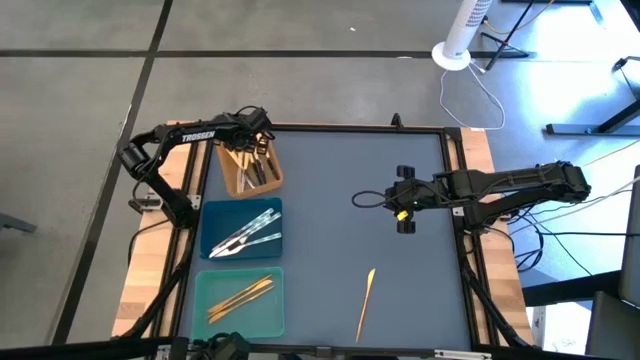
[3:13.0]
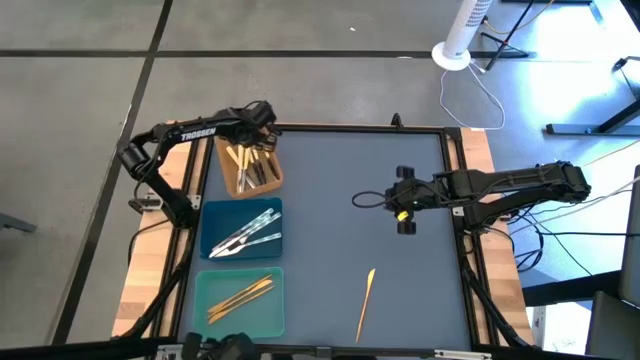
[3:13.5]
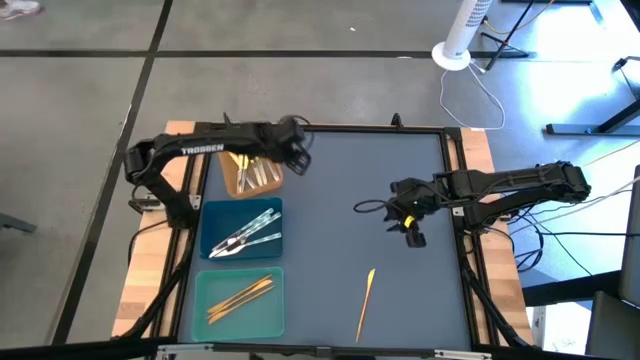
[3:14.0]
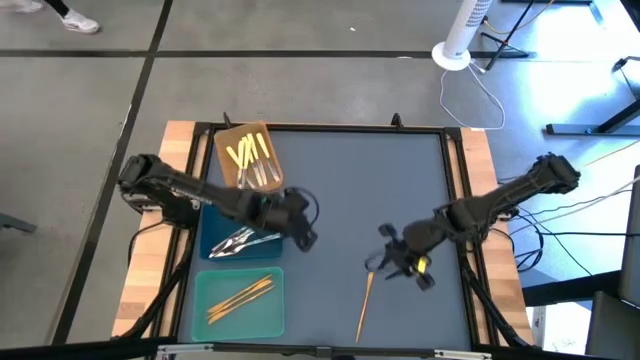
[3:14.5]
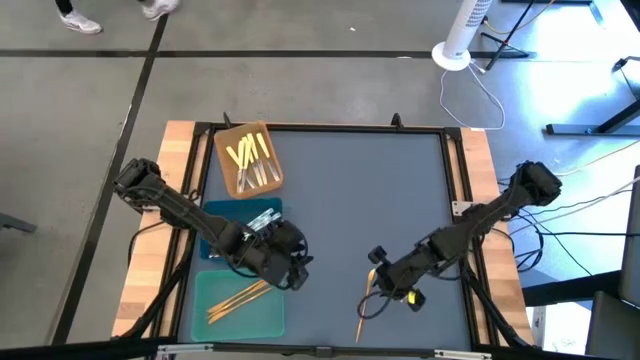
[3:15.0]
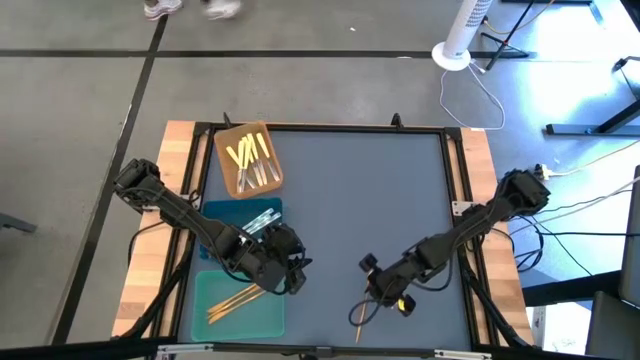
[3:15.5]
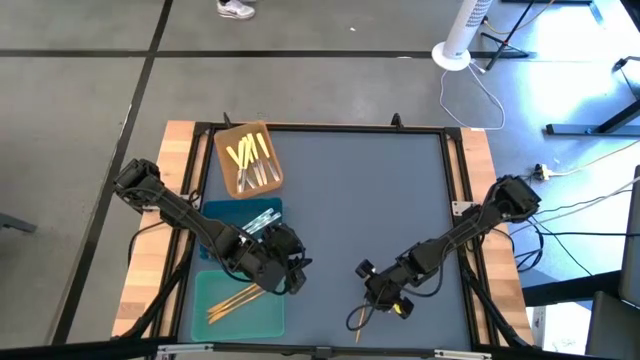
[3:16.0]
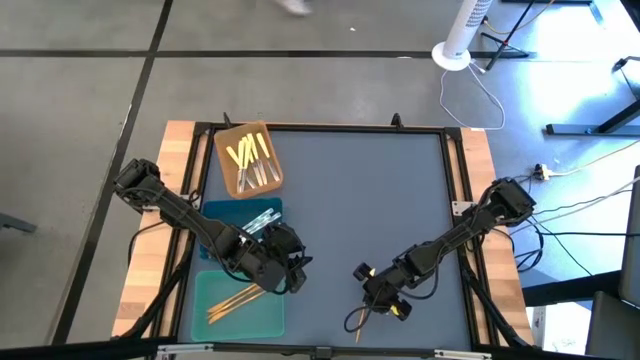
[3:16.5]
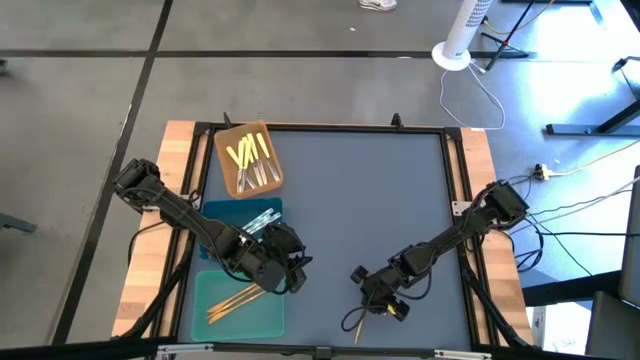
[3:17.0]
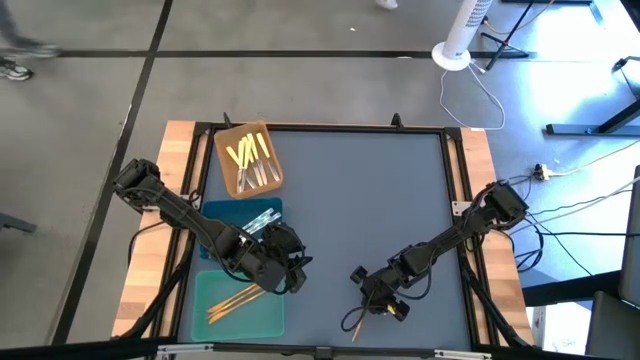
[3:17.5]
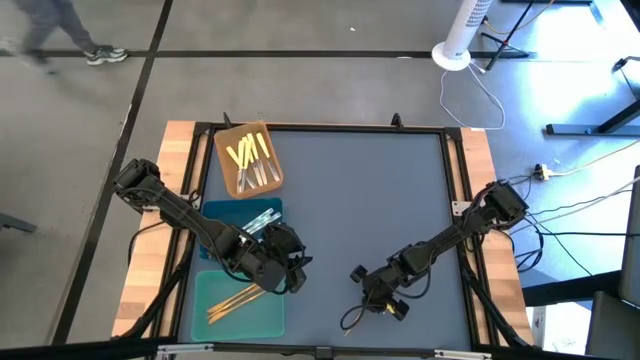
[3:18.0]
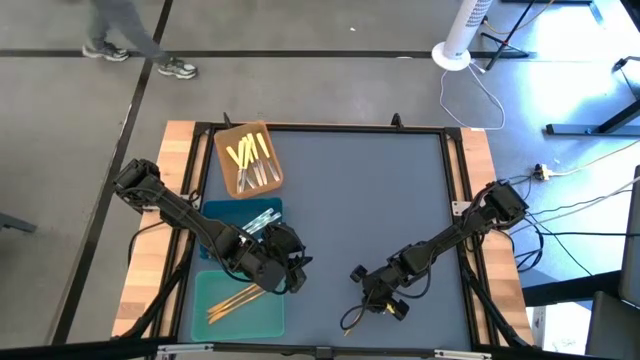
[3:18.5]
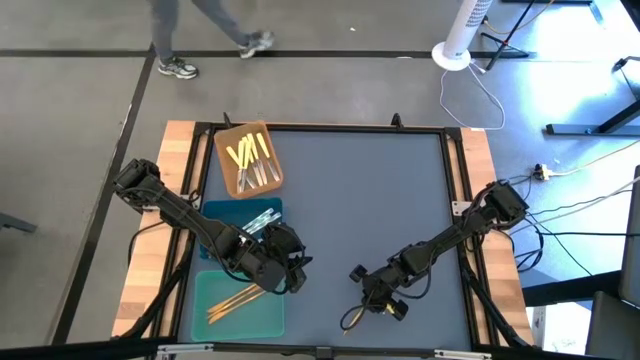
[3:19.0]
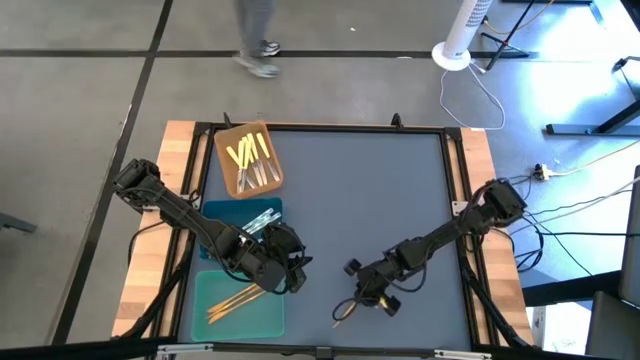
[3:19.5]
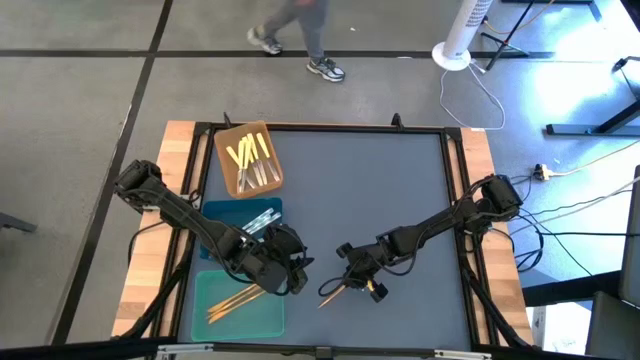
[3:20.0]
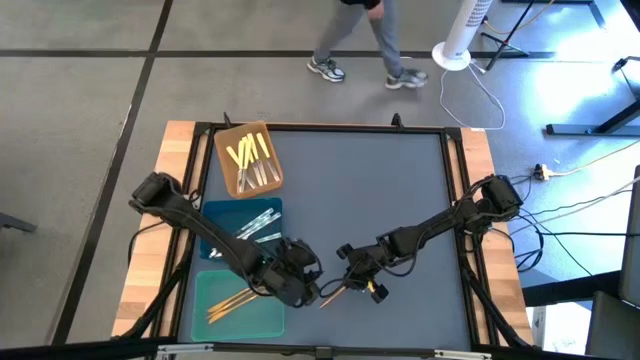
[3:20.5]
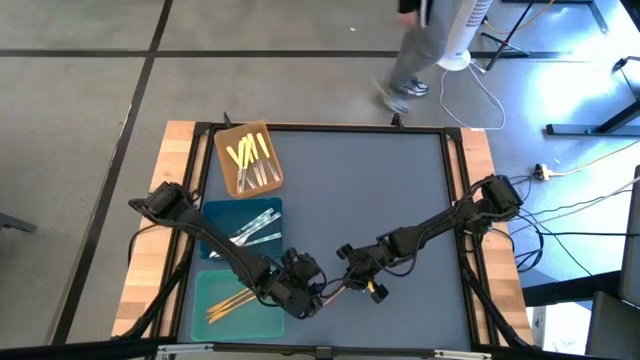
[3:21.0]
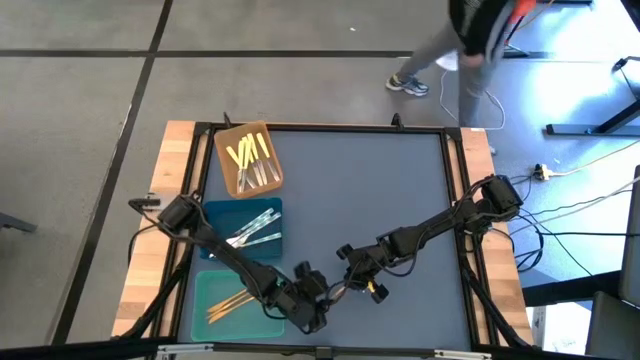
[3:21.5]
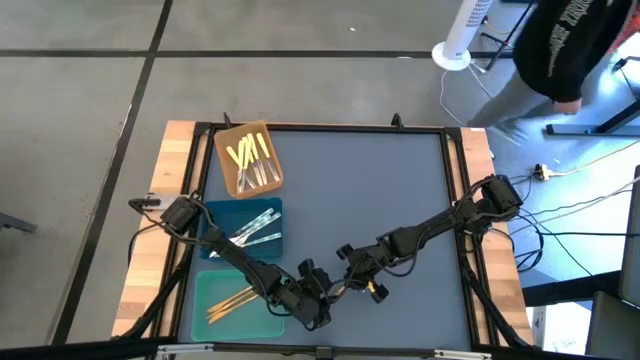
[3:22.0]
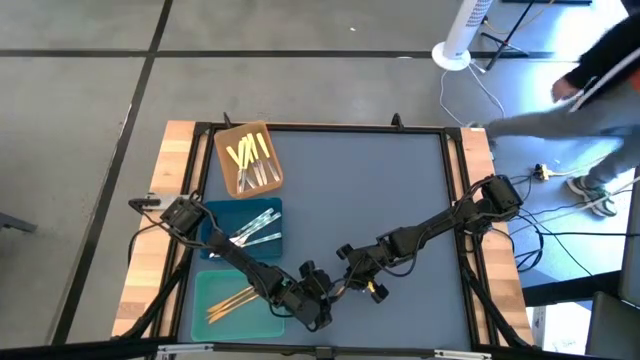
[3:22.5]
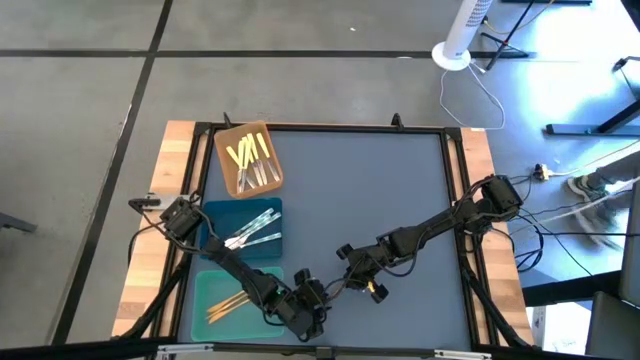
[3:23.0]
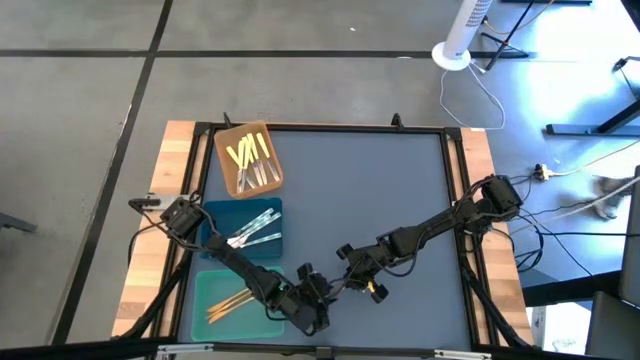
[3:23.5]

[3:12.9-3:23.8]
Task: Sort silverware by color (type)
Put the gold knife into the green bin

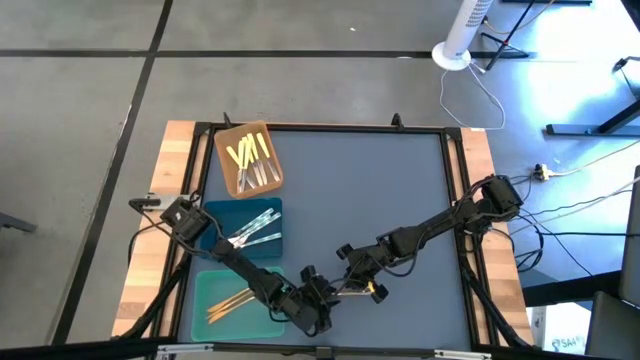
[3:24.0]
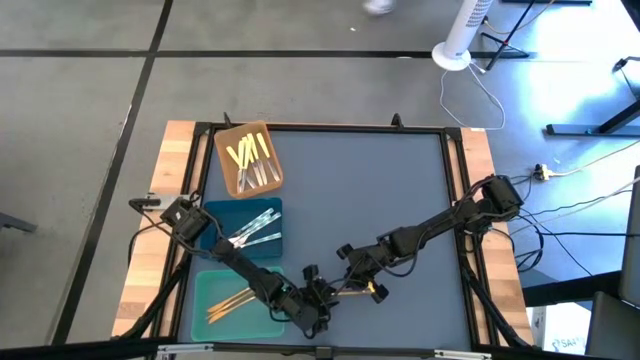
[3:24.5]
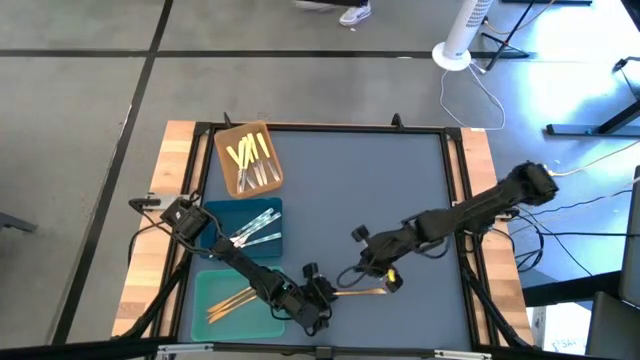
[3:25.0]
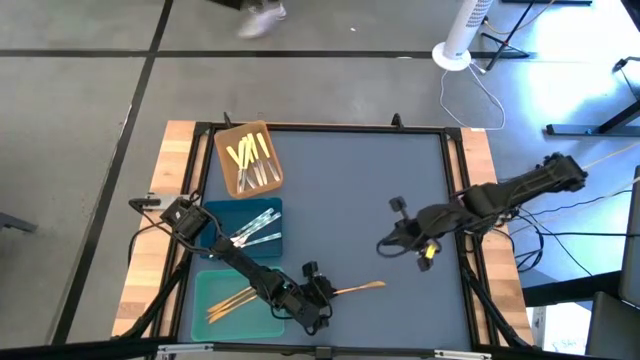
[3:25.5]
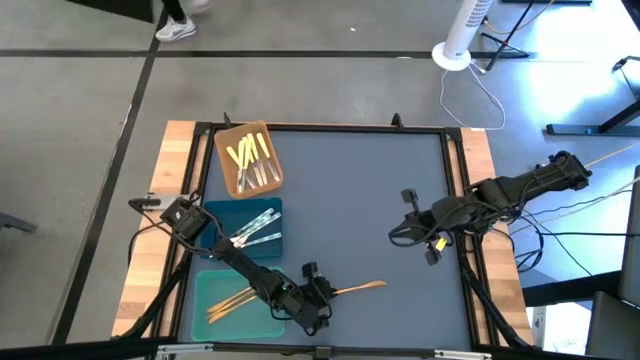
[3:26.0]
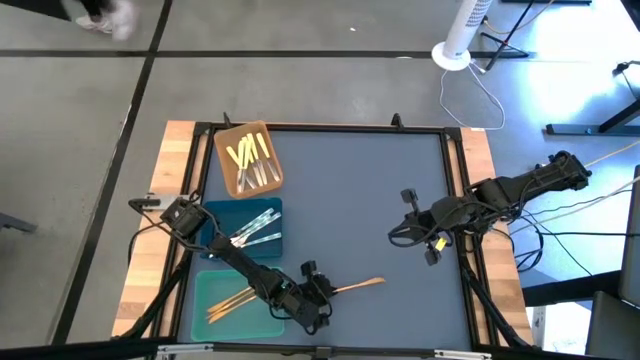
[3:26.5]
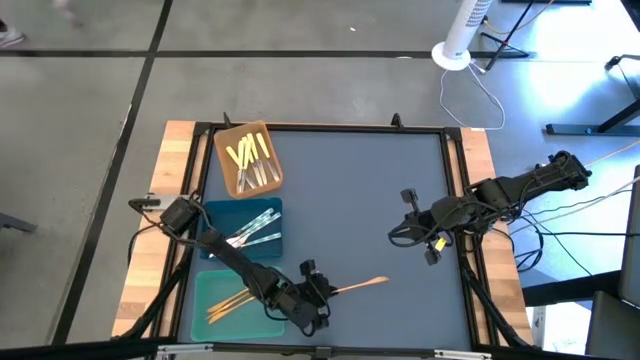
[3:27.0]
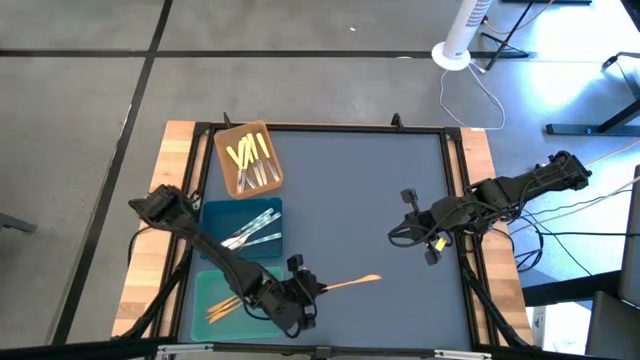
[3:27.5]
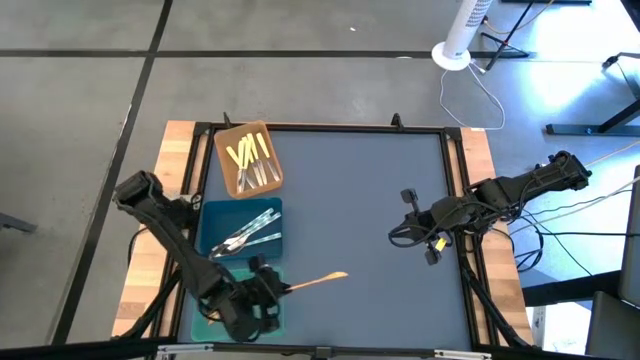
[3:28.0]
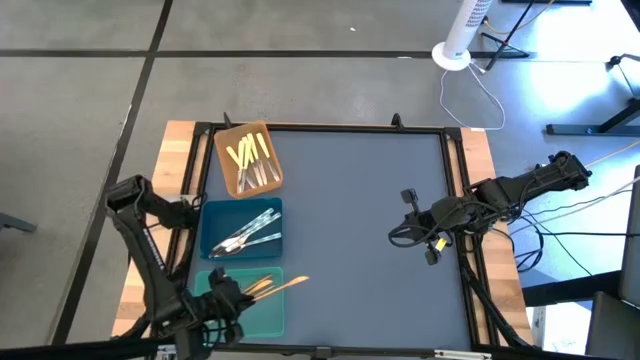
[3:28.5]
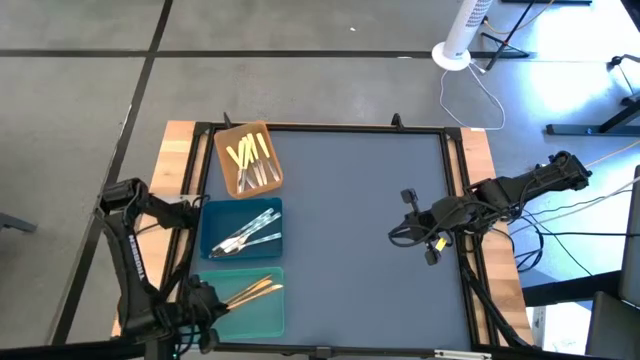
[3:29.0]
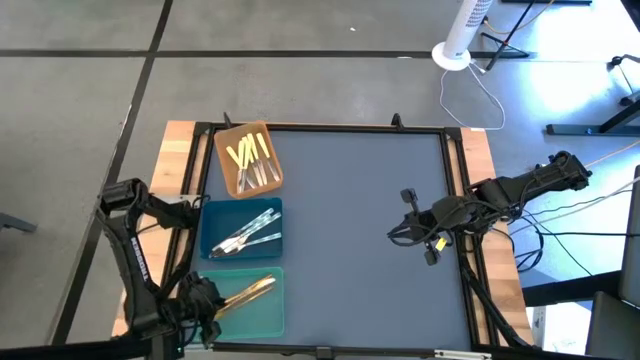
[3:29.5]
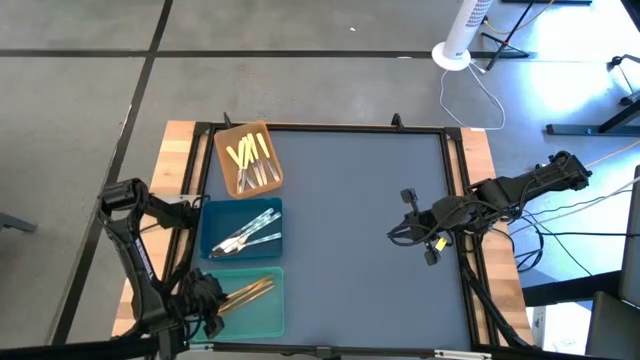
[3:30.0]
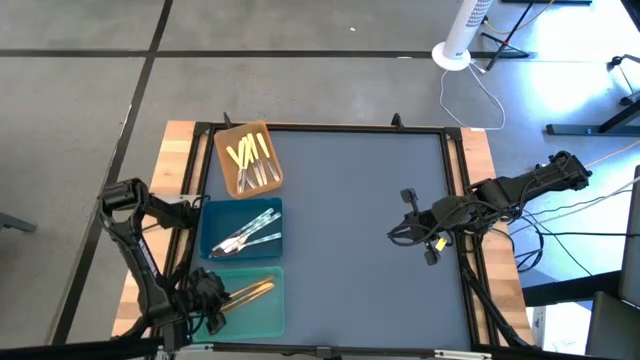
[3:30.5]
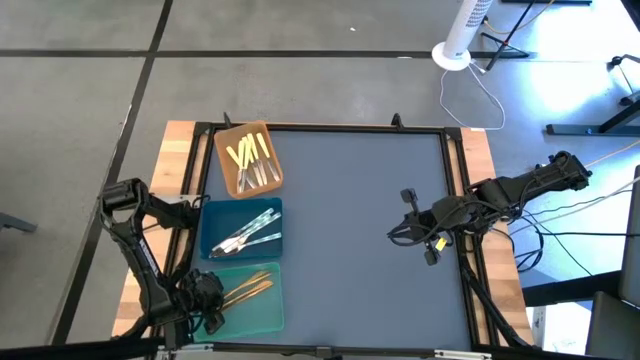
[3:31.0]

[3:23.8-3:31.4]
Put the gold knife into the green bin

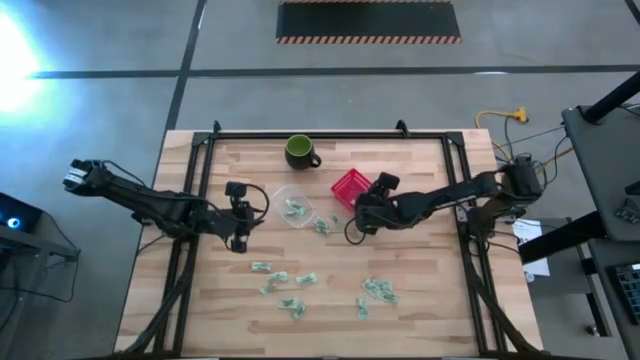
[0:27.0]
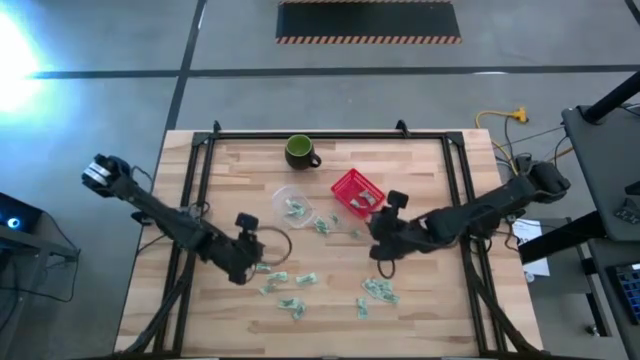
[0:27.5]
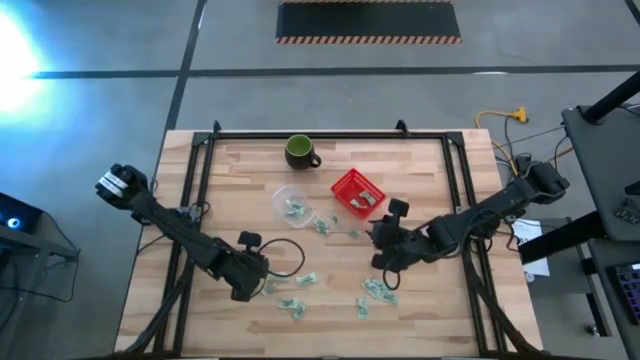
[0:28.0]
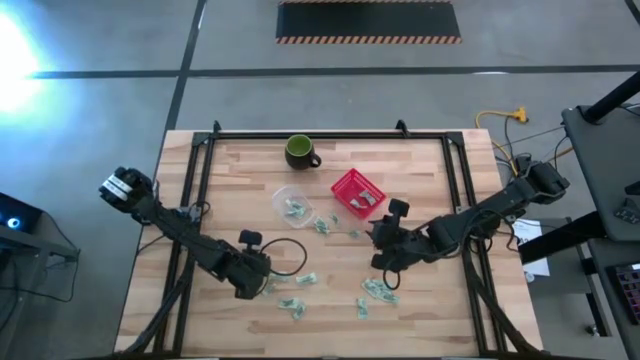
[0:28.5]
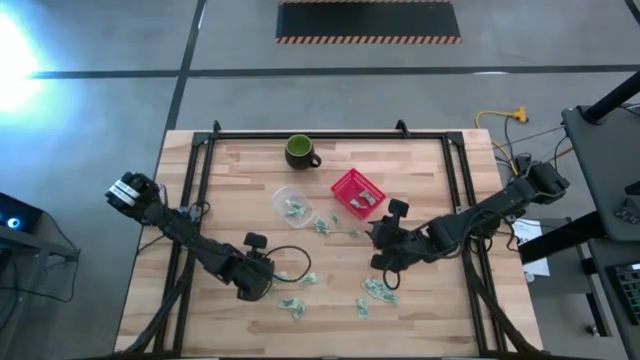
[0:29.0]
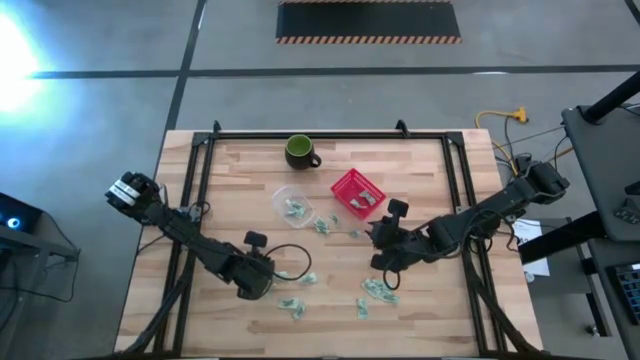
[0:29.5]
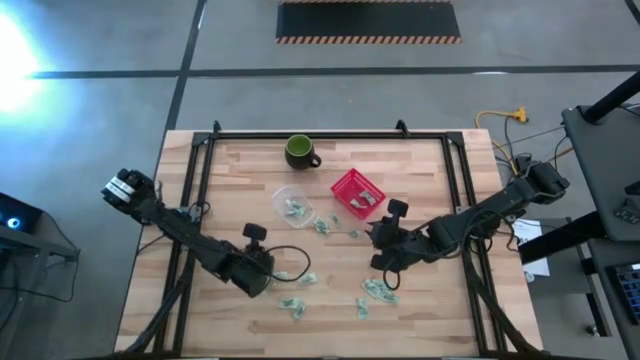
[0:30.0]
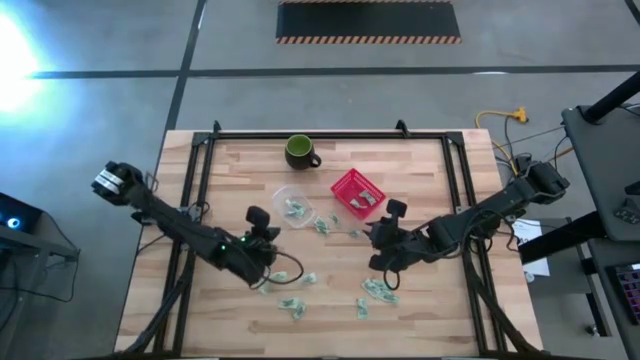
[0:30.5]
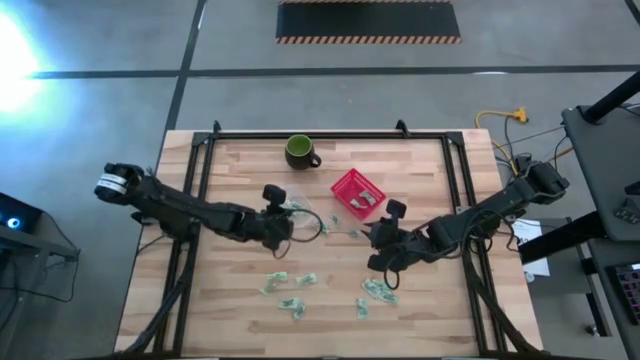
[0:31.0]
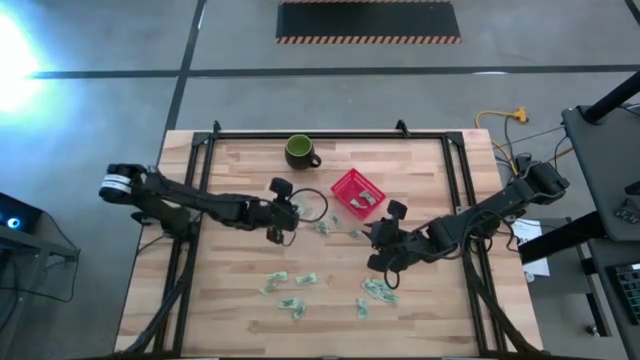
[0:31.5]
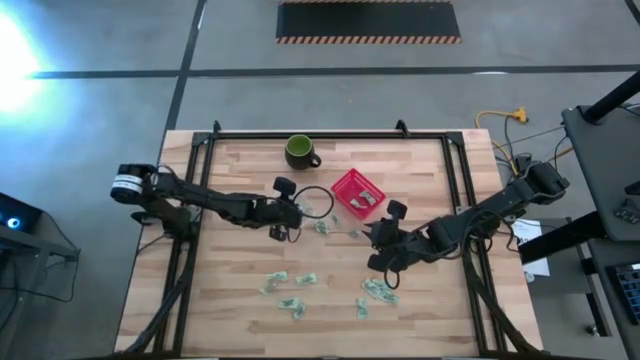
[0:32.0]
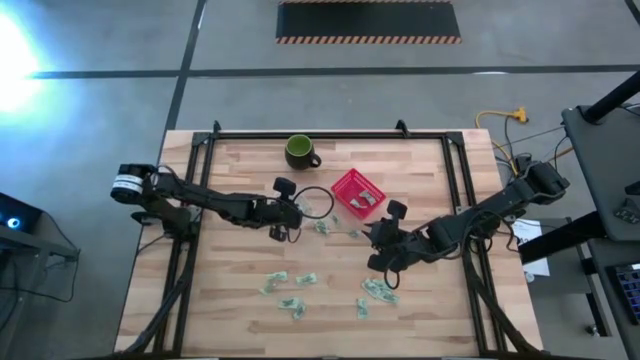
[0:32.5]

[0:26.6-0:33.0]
Task: Pick and place items into bin
Put the stevia packet into the transparent bin
